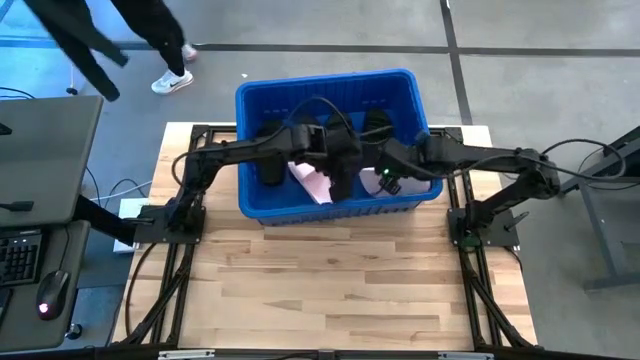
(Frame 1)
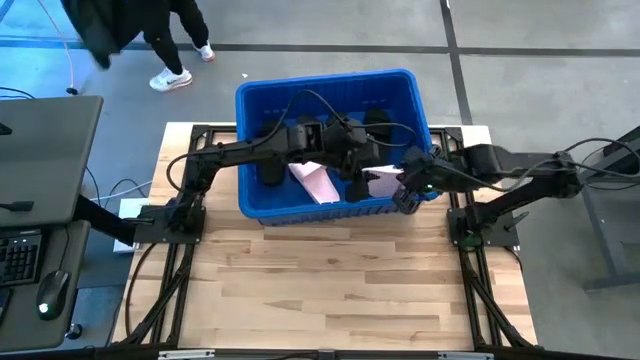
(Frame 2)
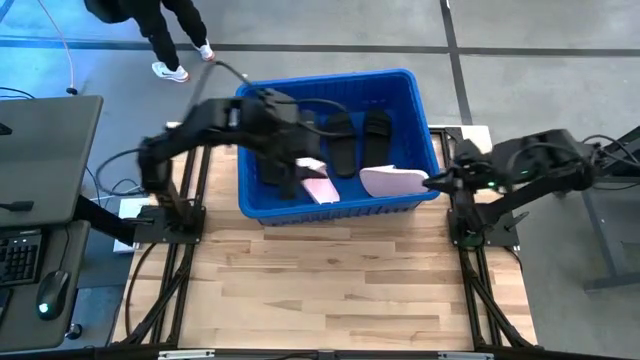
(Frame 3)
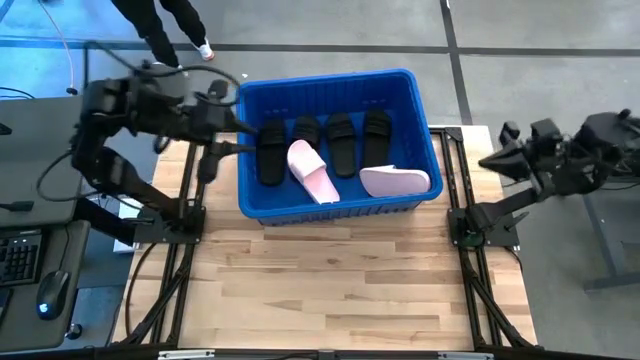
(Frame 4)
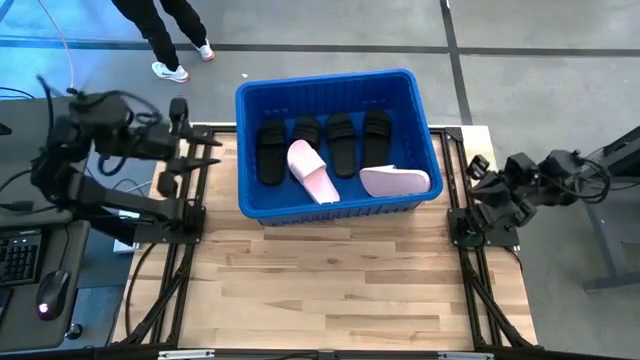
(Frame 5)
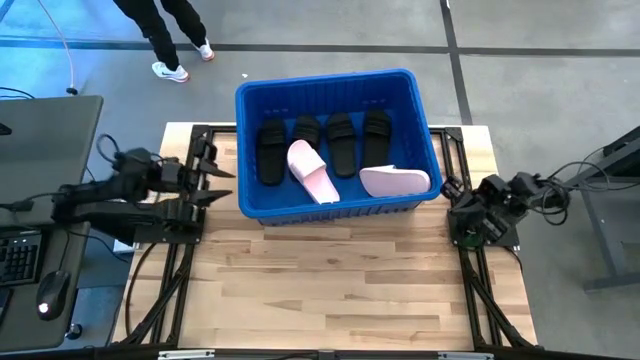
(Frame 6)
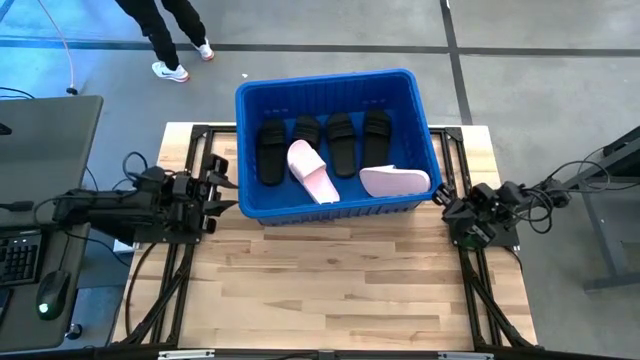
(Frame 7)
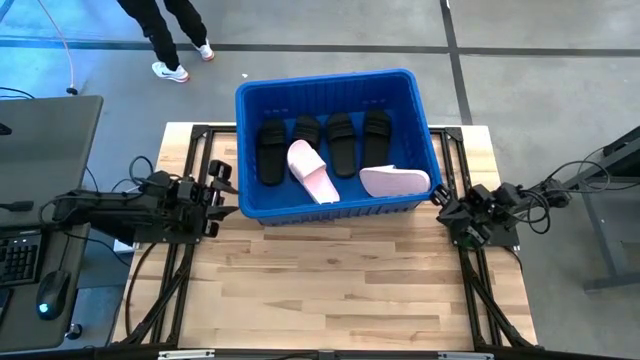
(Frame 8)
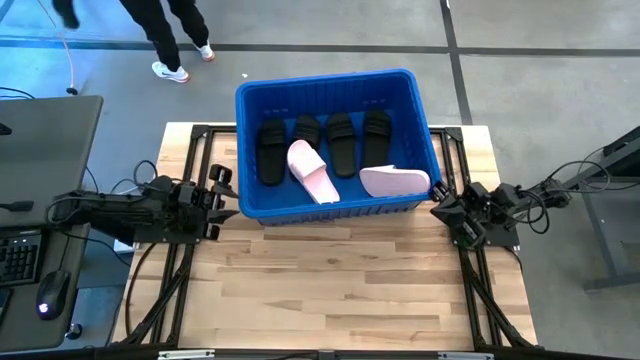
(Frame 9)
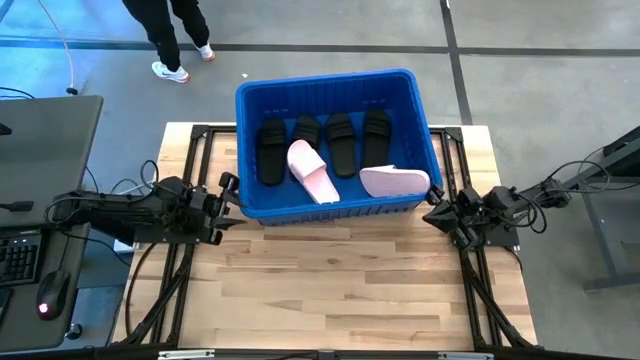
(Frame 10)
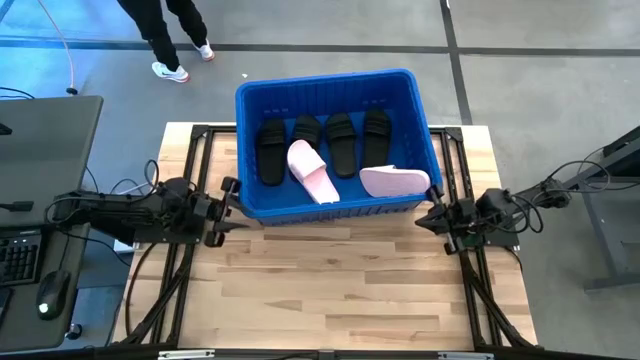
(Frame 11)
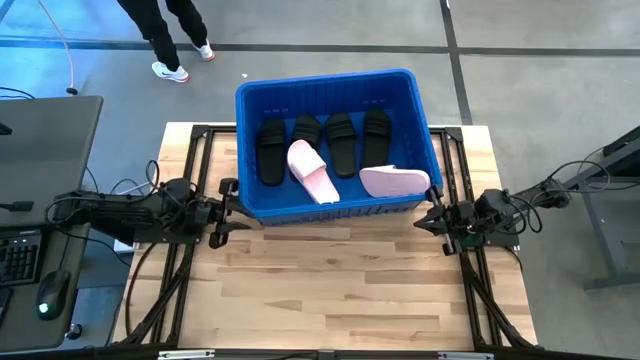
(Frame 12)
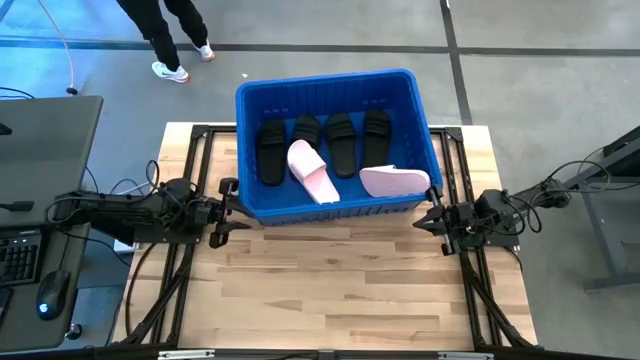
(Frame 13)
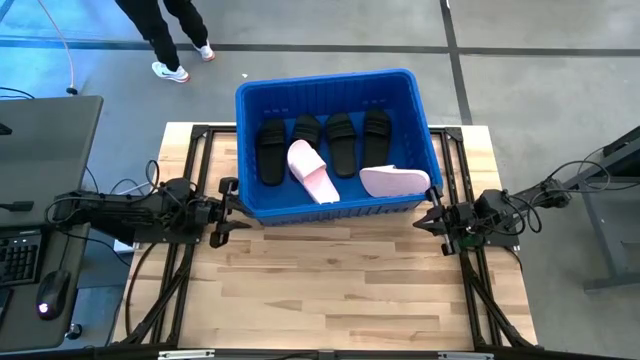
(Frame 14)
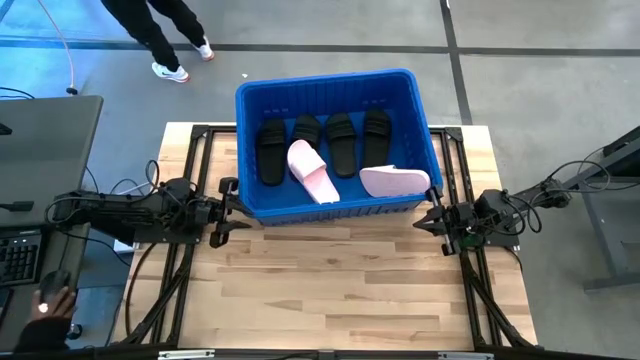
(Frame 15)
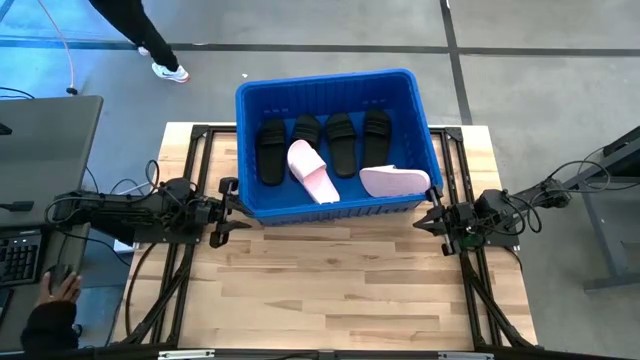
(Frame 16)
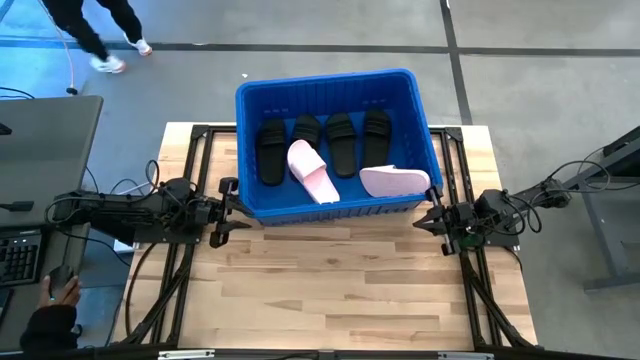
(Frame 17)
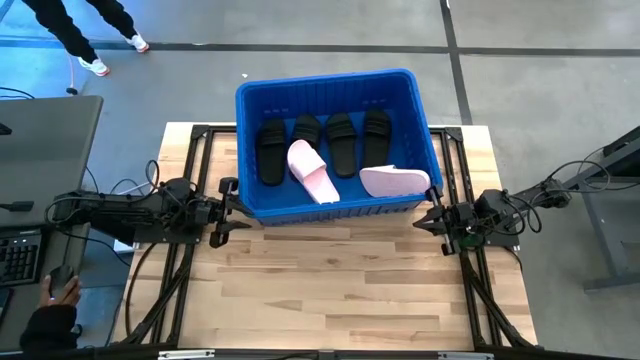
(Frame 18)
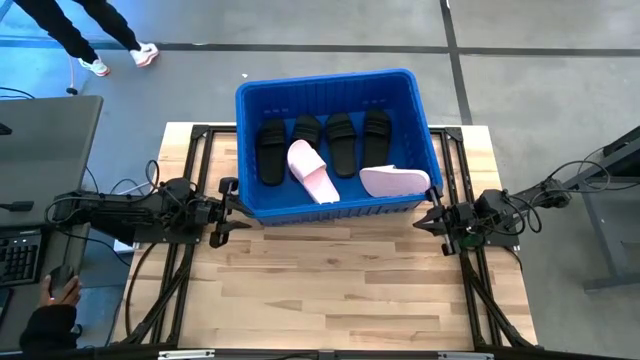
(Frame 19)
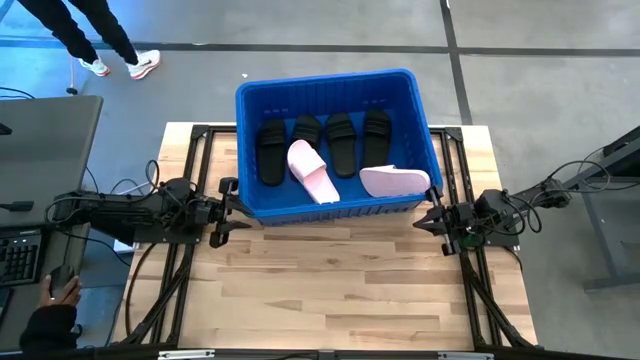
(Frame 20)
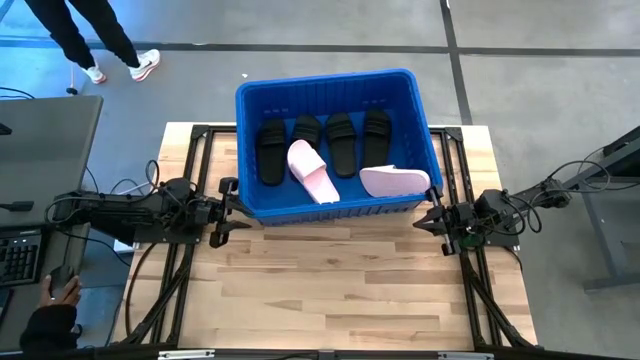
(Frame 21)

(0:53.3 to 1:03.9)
Task: Pick and place slides into bin
Return to Home Position

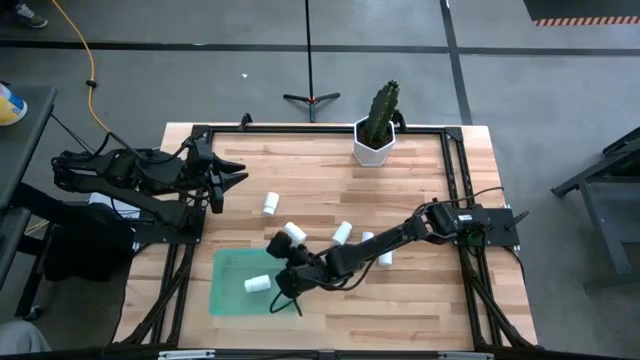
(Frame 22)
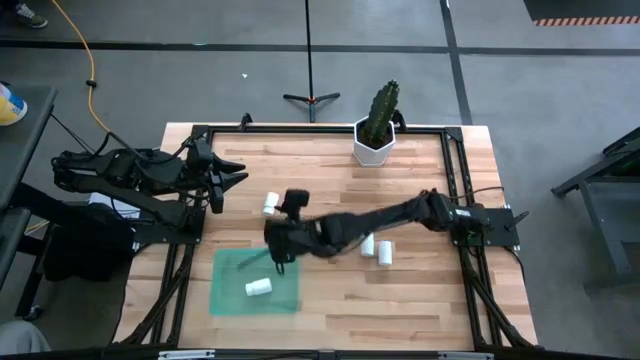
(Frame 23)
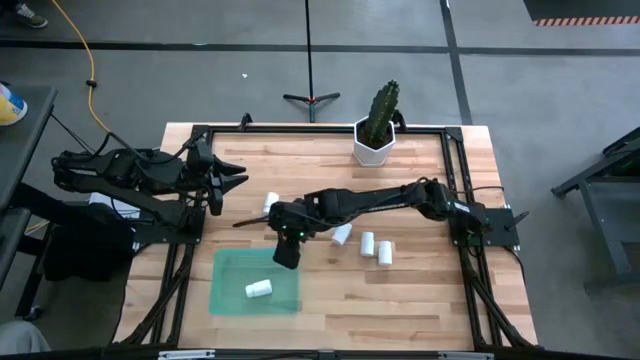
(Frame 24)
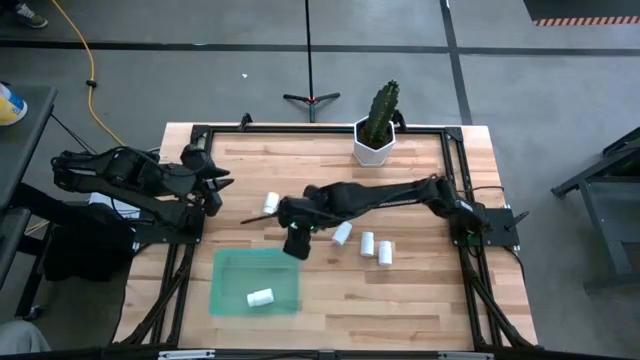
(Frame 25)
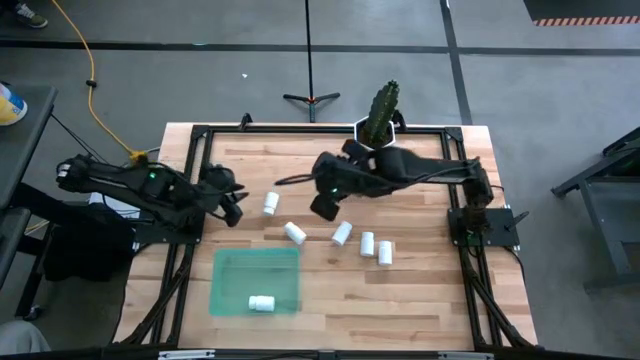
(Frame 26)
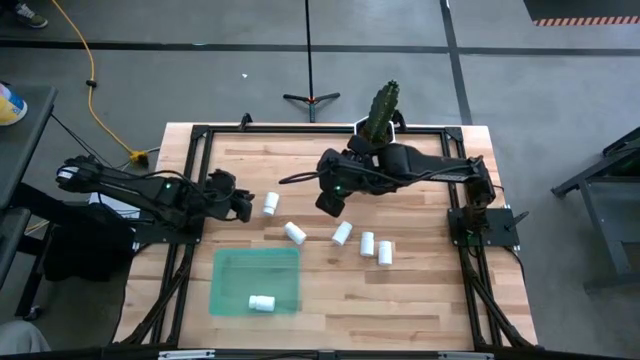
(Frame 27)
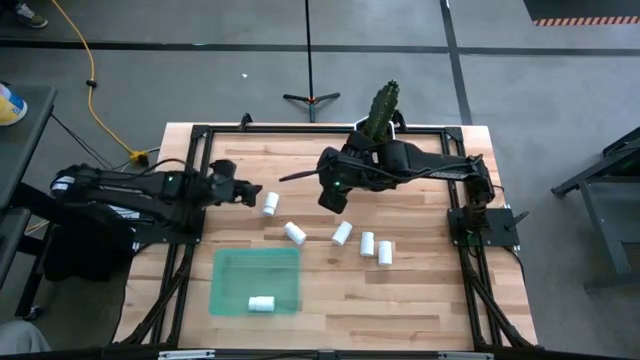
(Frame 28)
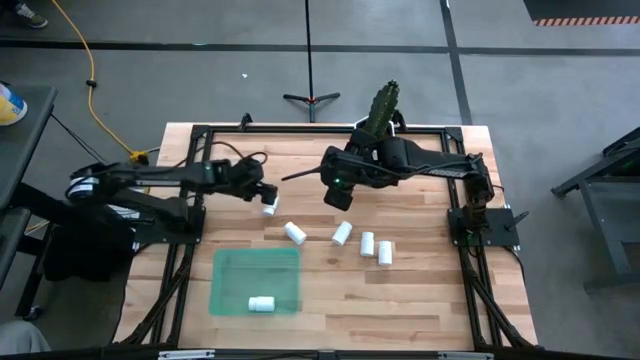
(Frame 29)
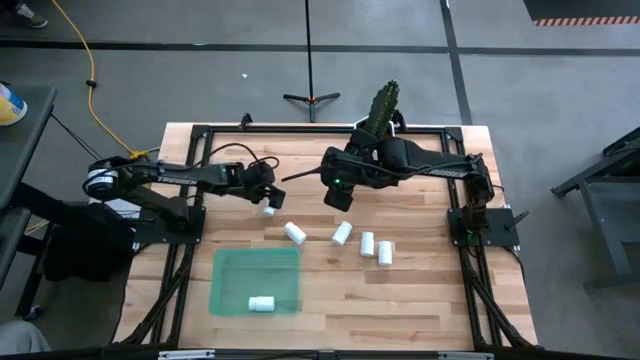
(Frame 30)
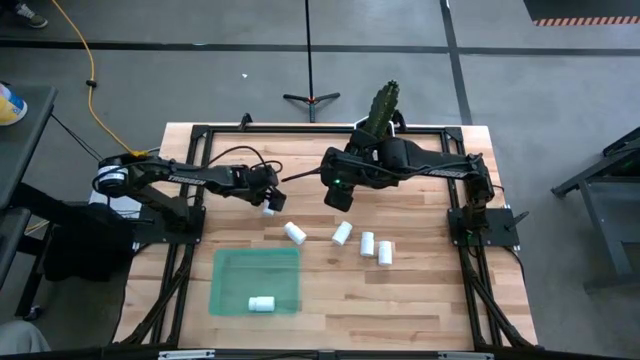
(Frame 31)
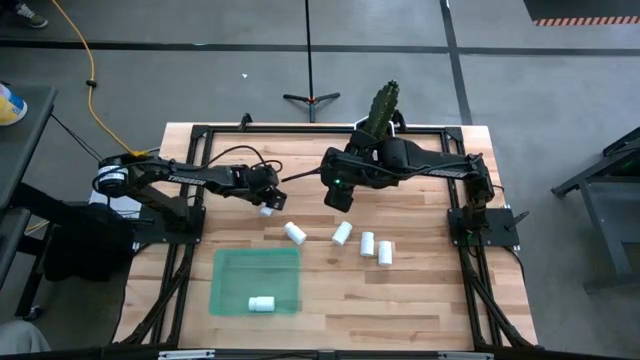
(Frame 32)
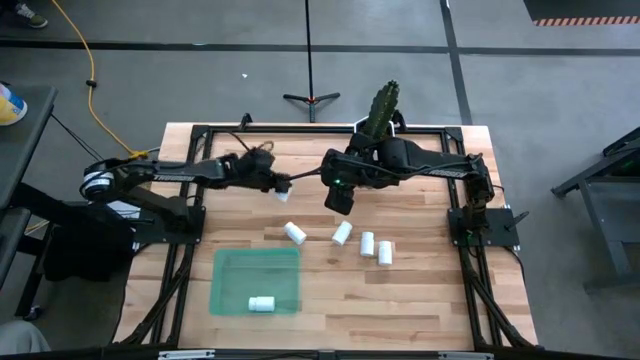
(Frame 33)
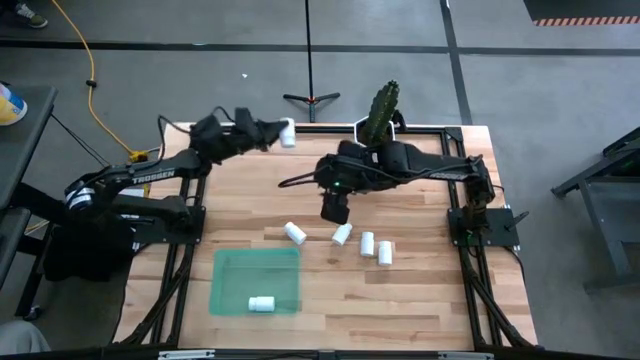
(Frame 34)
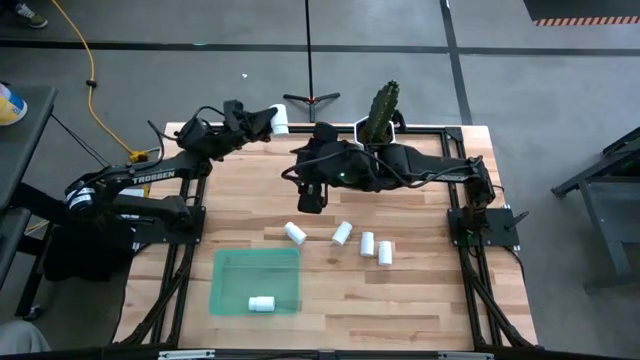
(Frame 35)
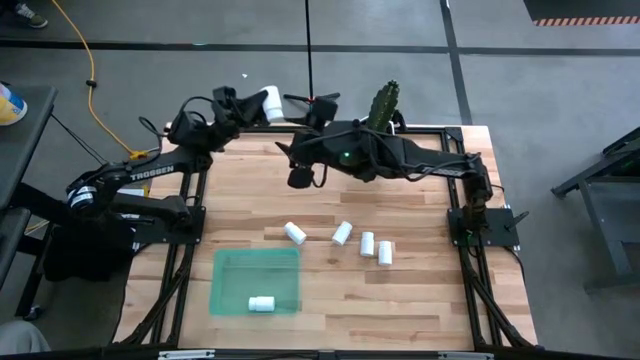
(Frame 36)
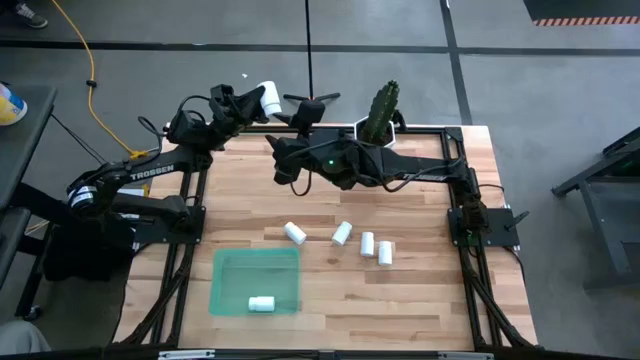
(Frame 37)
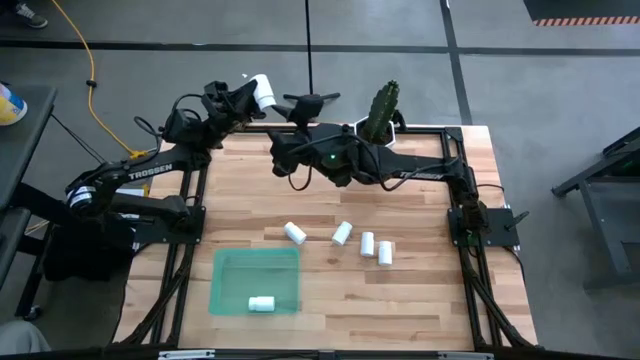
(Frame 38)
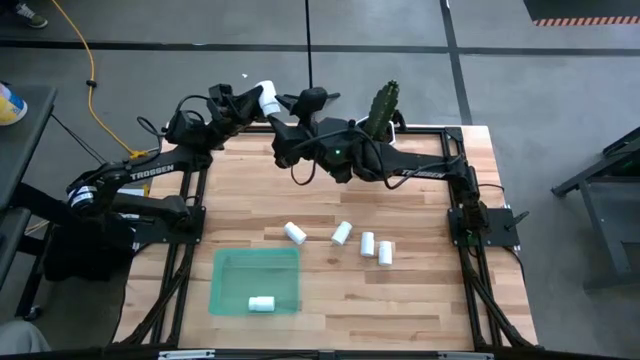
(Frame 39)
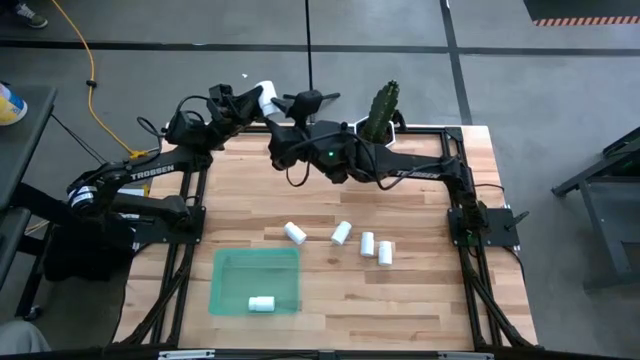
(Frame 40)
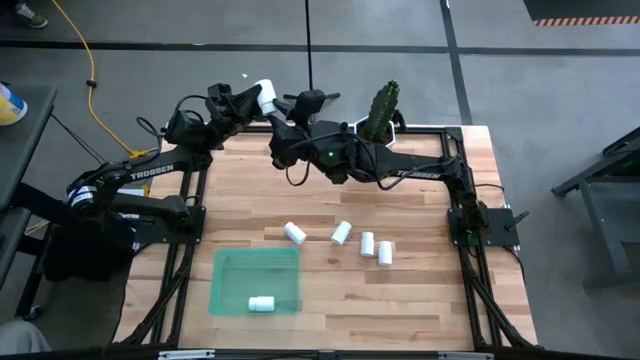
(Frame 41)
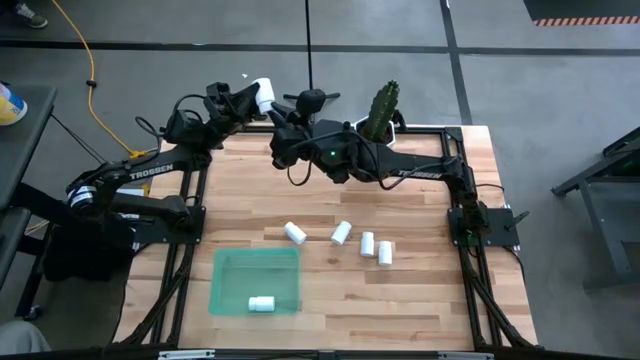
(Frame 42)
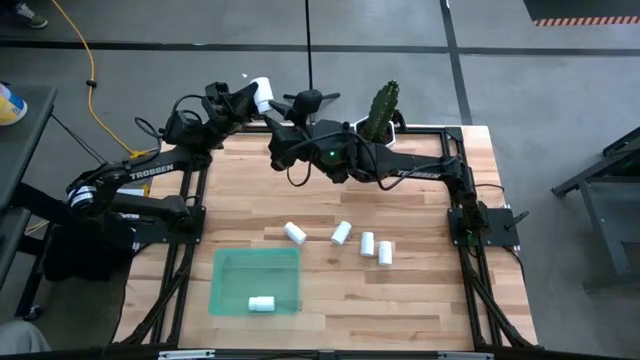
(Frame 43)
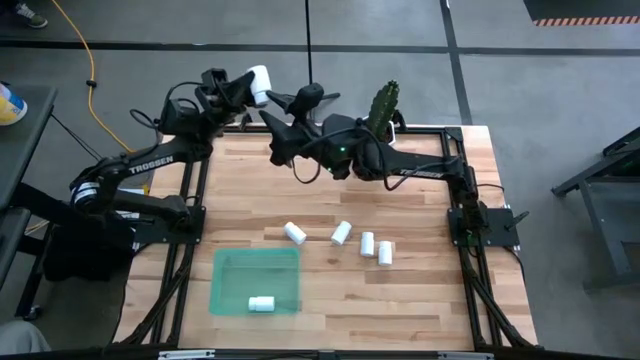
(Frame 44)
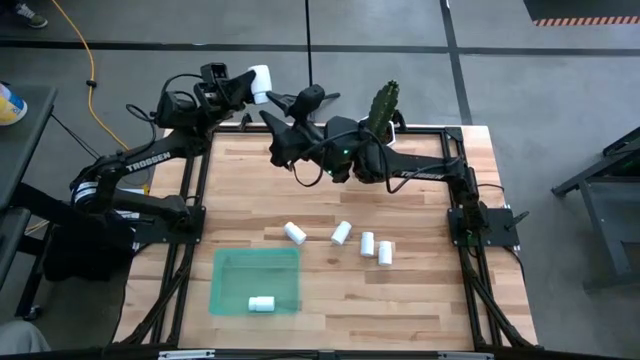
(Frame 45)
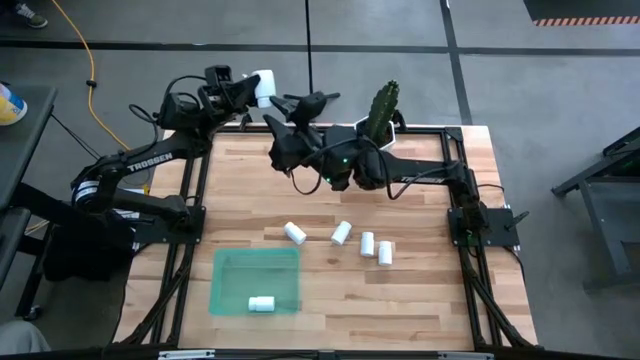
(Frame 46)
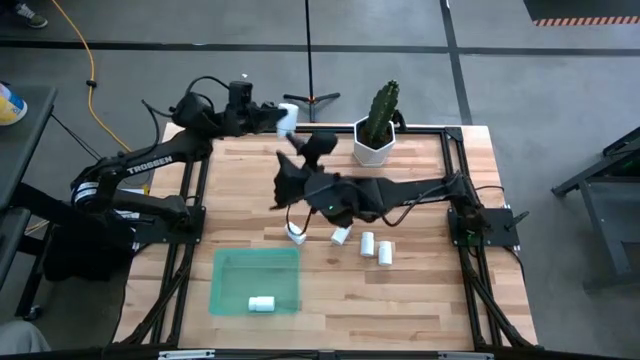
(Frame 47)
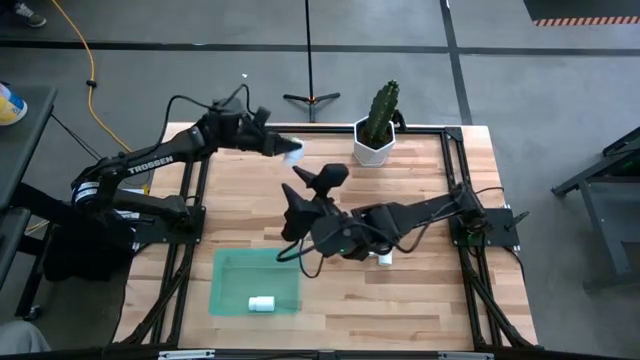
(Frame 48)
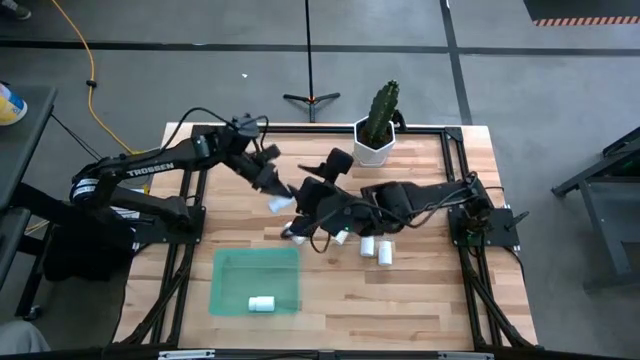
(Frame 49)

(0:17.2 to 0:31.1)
Task: Pick and place pill bottles into a basket
Put the white pill bottle into the green bin
